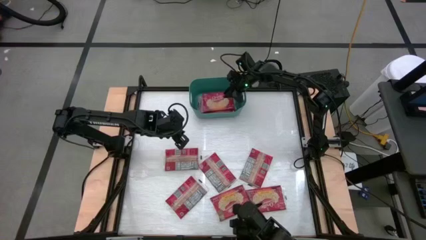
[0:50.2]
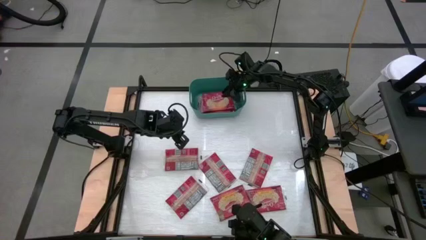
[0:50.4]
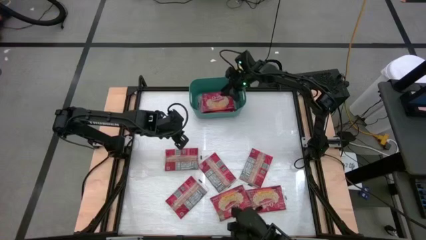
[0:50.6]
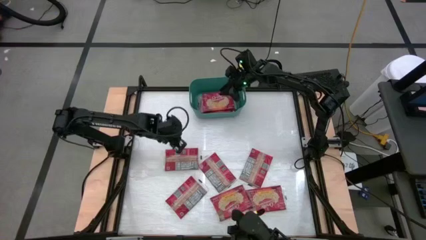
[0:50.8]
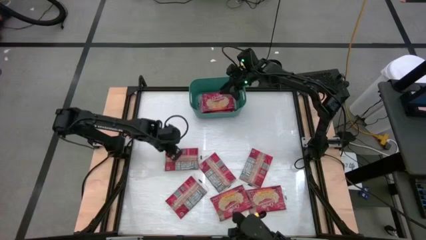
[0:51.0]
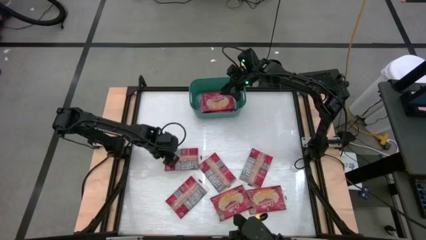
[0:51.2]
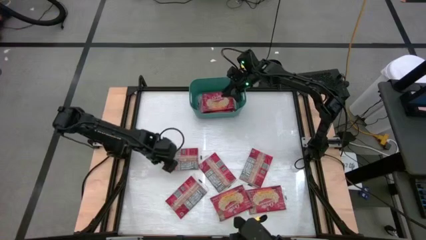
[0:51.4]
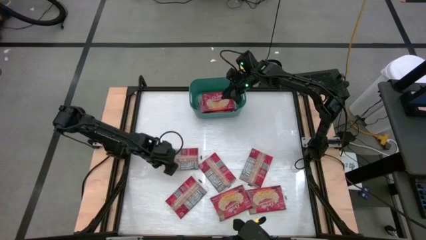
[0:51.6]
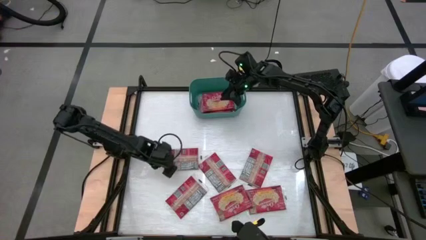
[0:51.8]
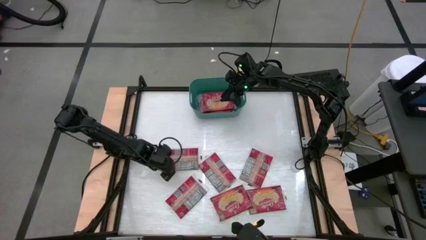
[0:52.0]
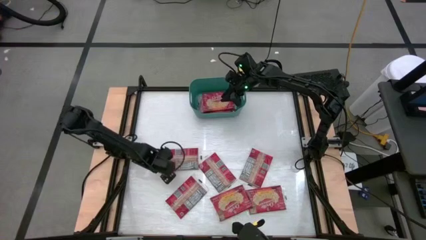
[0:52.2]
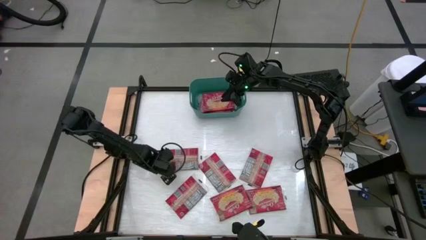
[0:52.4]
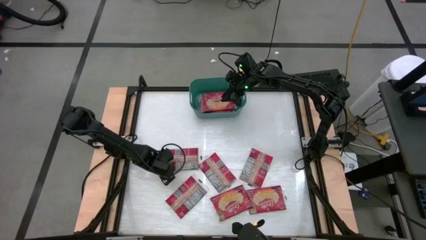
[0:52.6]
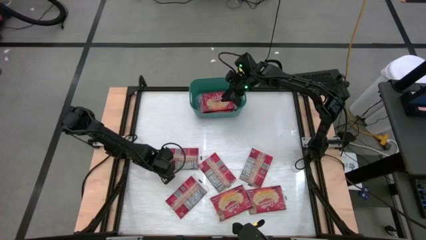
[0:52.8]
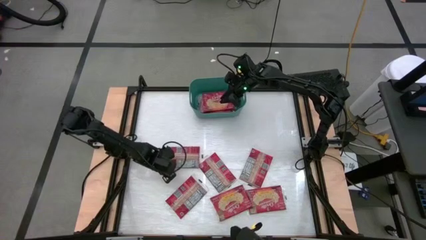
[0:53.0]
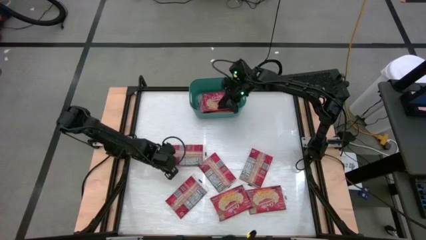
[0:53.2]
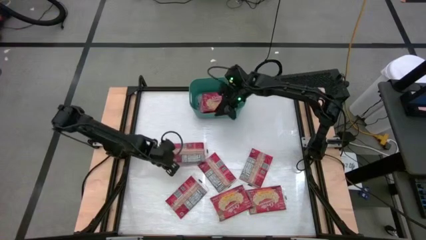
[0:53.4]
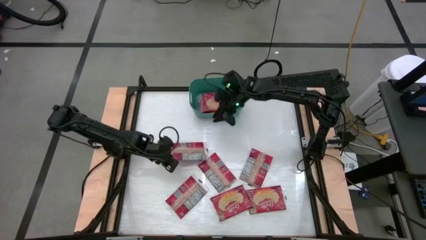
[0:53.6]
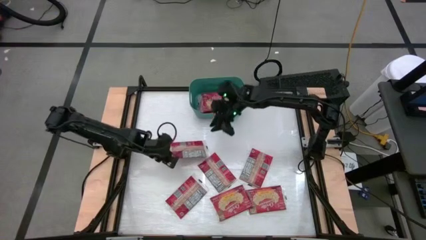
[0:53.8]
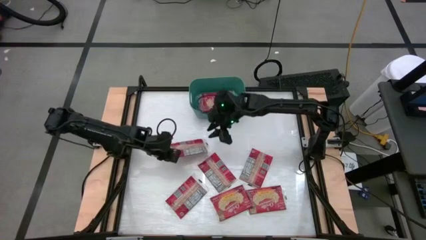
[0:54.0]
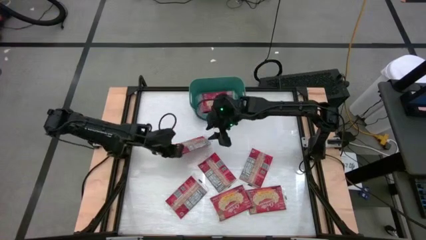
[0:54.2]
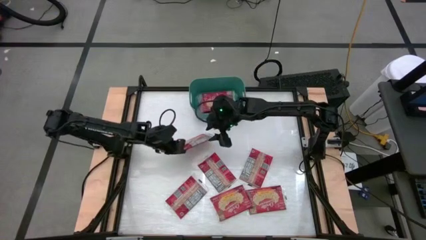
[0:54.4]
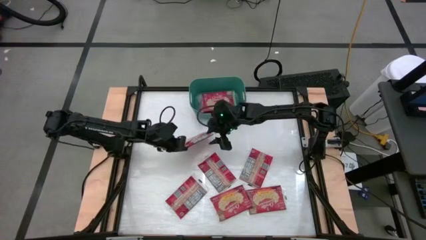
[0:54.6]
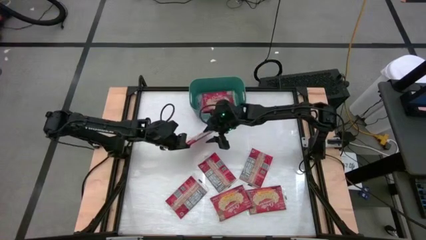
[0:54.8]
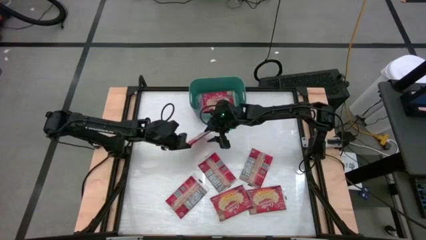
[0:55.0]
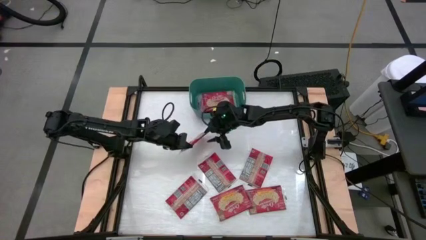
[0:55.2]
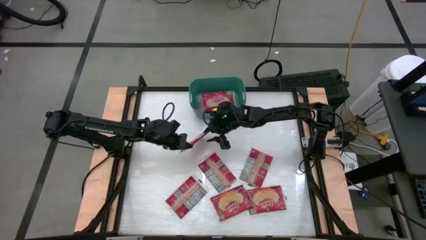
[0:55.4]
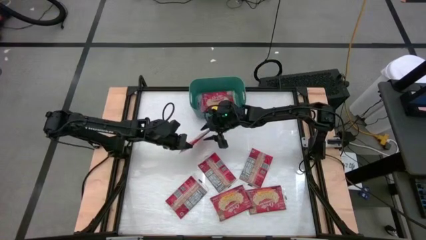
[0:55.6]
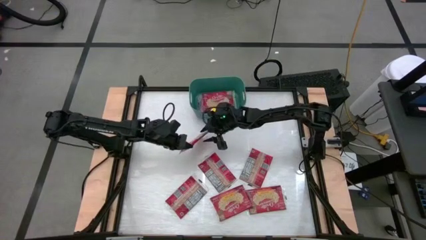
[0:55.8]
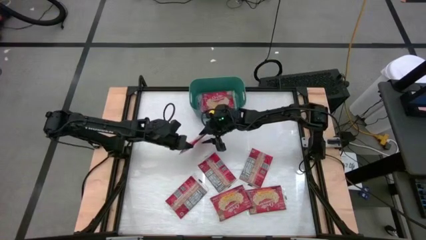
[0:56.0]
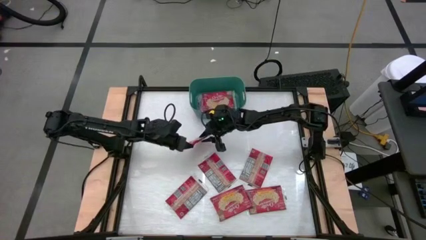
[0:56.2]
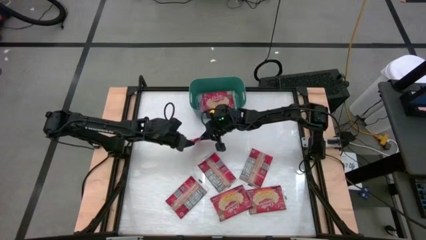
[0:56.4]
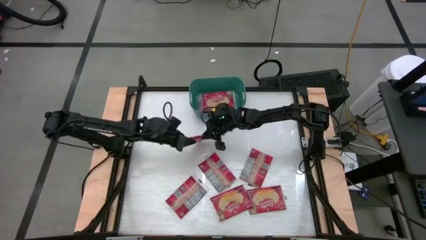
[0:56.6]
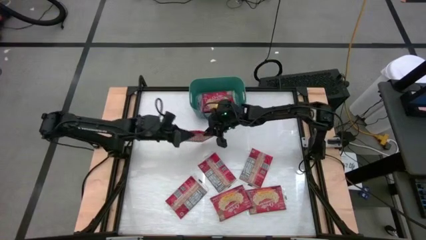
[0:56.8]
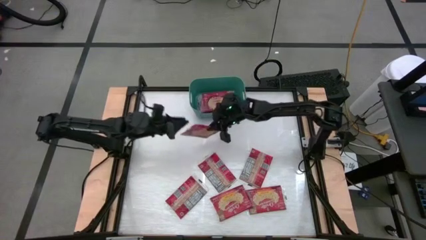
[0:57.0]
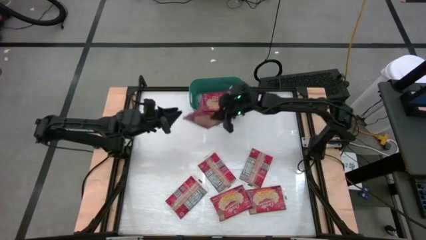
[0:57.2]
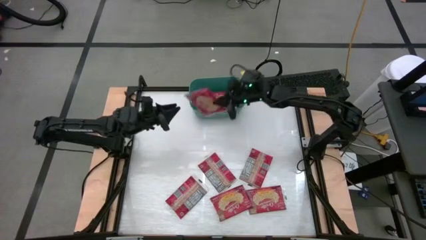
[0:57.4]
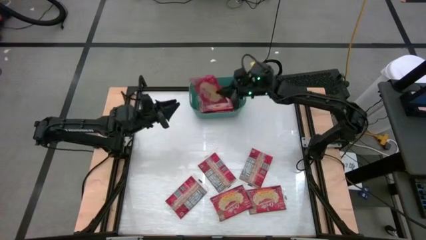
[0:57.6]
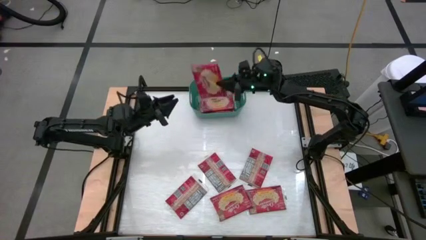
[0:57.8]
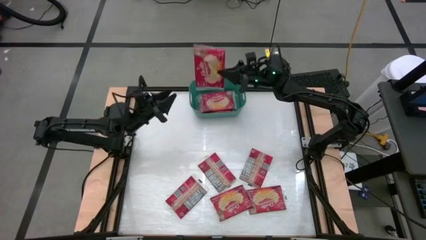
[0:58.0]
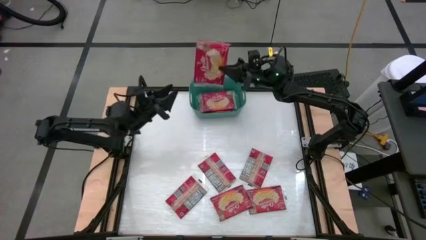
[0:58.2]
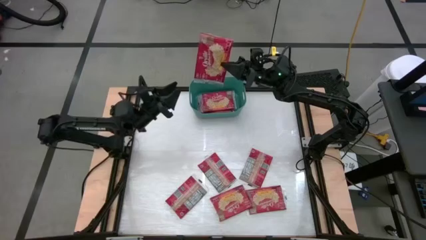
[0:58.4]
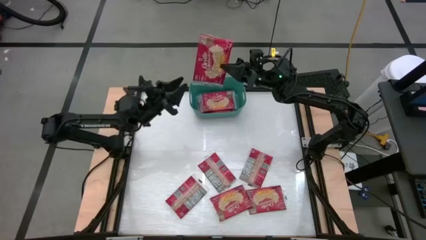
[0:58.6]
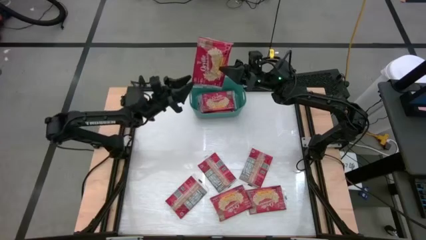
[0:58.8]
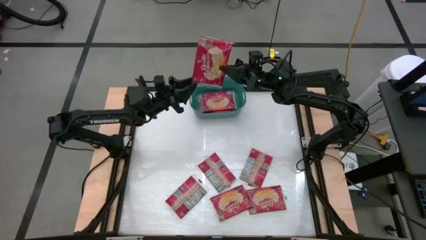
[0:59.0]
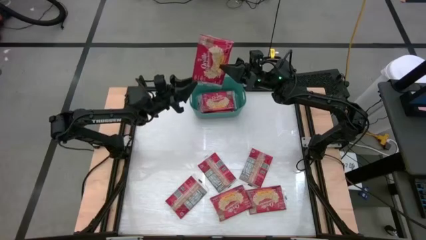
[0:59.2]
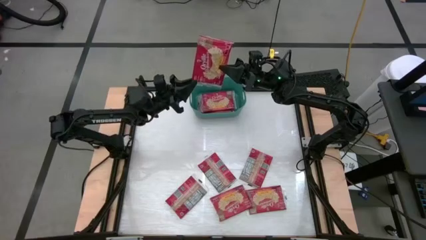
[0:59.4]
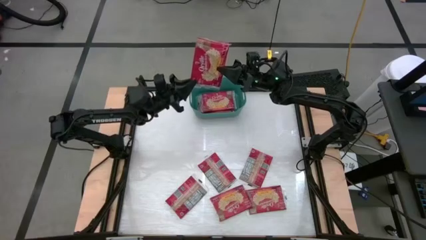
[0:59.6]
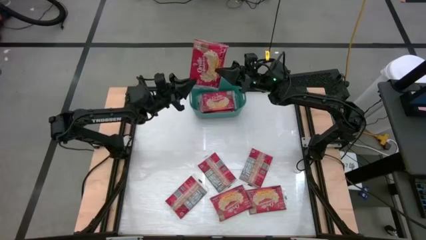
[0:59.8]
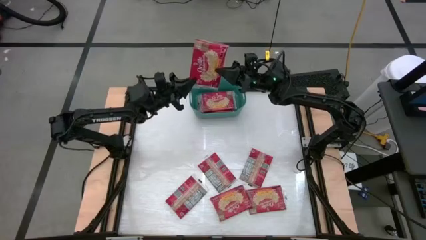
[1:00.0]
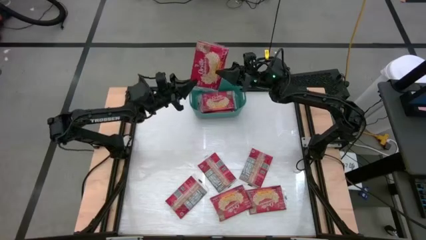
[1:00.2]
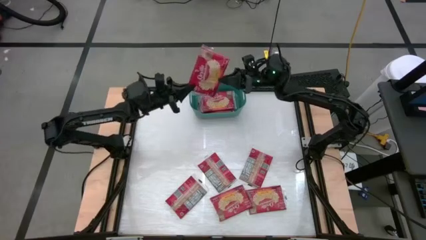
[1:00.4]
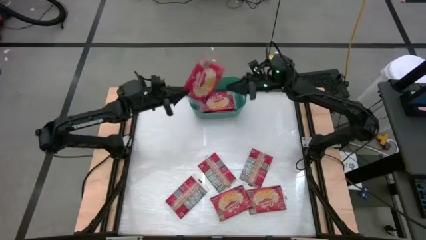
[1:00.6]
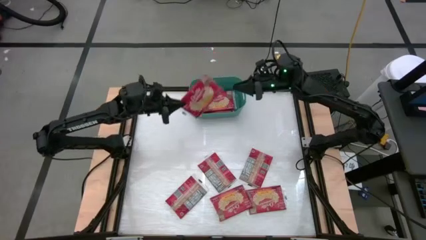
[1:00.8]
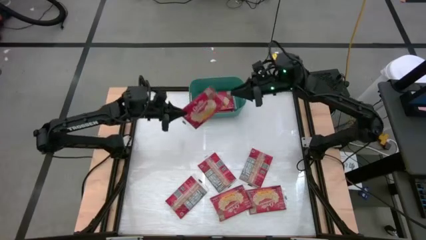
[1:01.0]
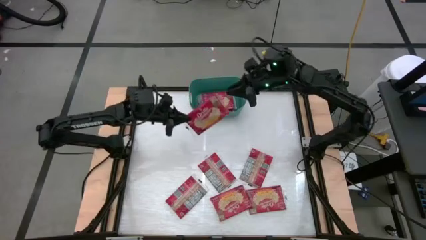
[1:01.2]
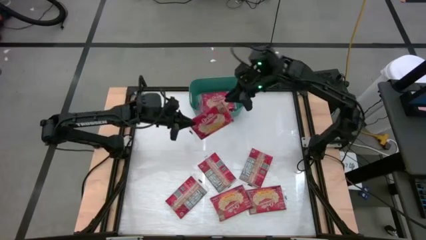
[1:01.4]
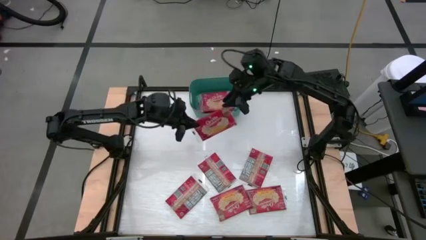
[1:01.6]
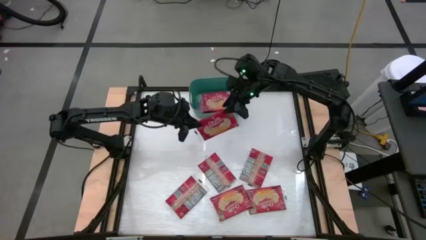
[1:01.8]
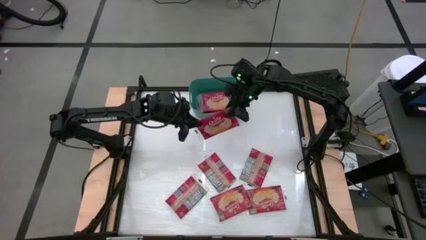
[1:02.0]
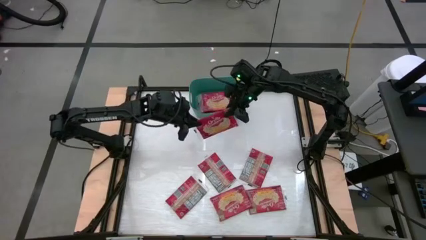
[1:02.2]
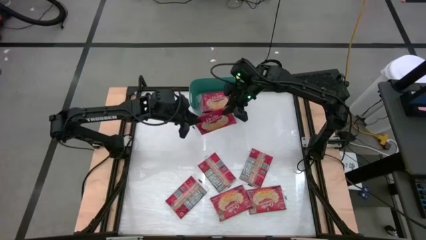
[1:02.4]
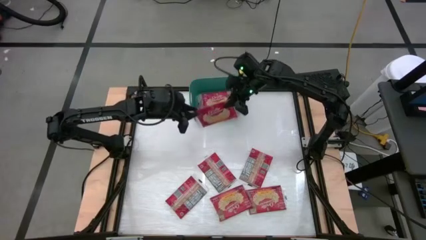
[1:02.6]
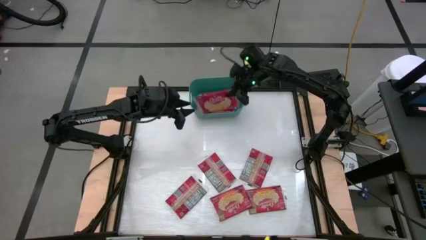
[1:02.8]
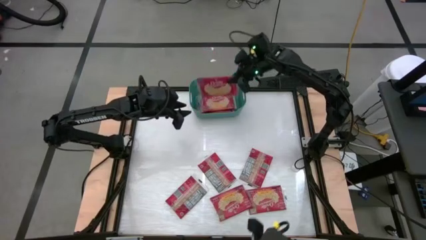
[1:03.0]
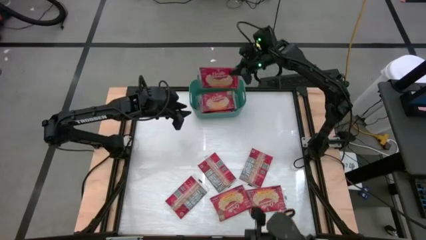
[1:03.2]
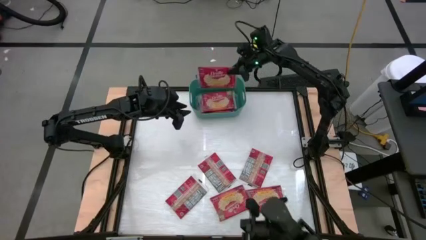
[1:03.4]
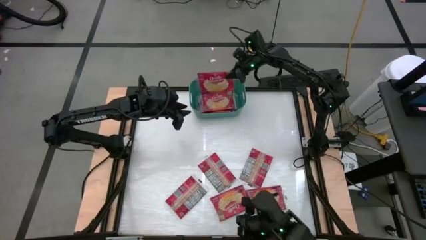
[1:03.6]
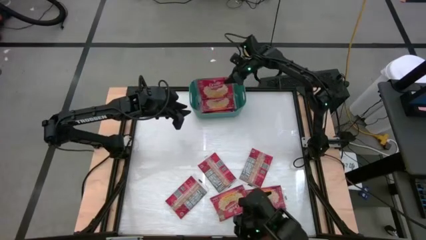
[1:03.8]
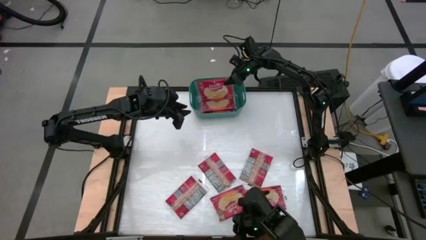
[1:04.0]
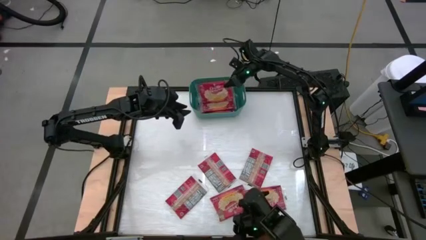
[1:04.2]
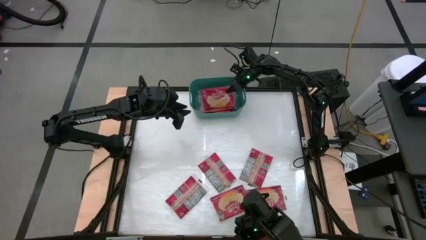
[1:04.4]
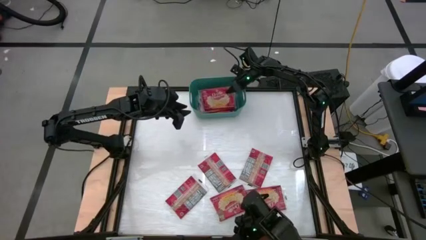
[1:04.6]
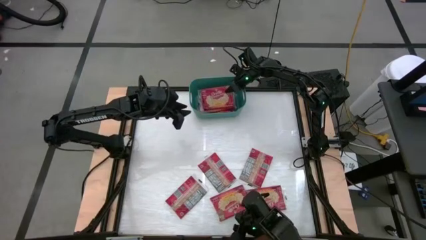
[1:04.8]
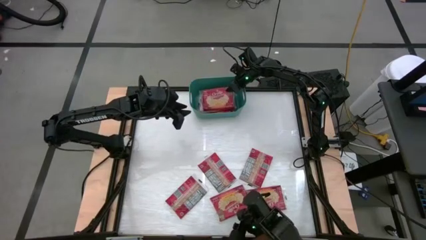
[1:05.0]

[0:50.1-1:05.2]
Task: Sort popcorn bags into baskets
Put the red popcorn pack into the green bin

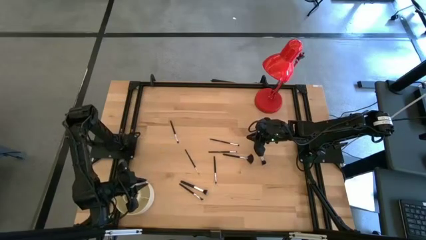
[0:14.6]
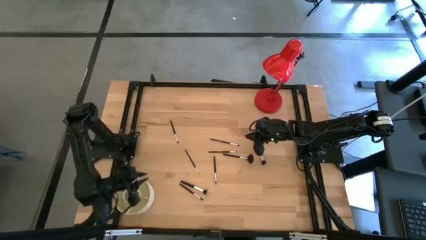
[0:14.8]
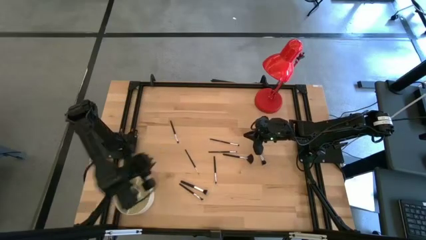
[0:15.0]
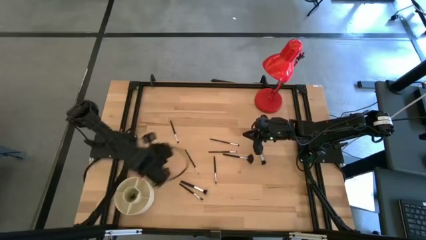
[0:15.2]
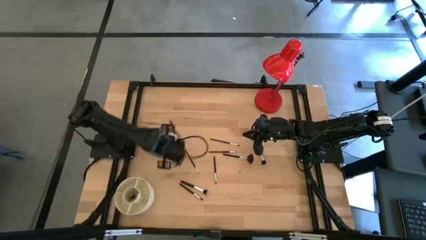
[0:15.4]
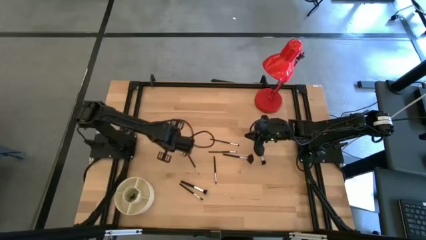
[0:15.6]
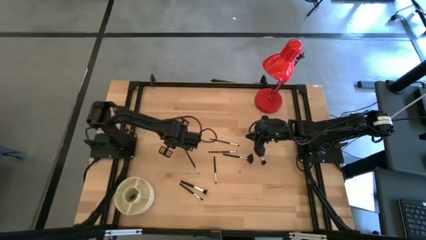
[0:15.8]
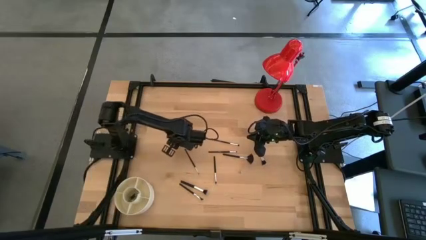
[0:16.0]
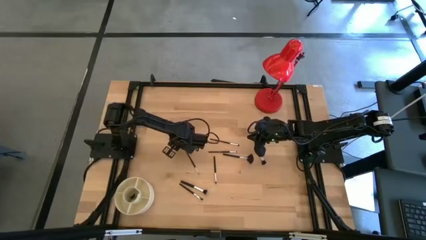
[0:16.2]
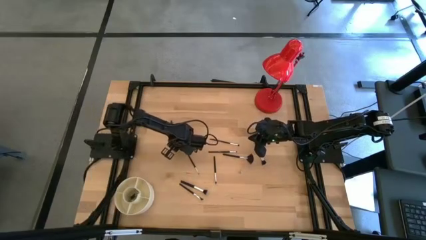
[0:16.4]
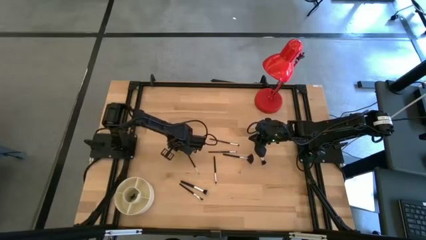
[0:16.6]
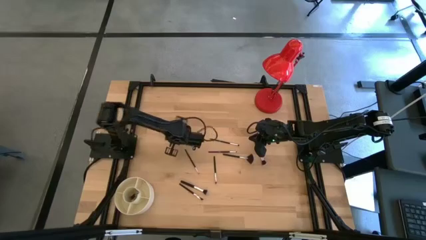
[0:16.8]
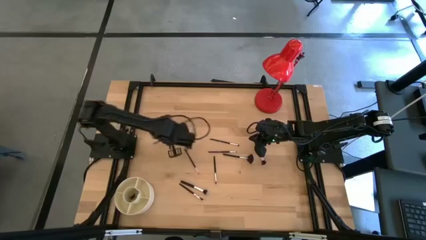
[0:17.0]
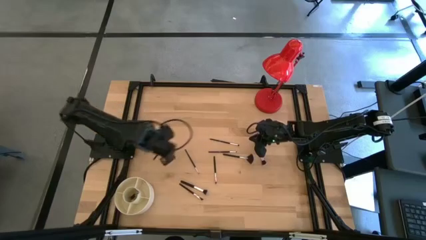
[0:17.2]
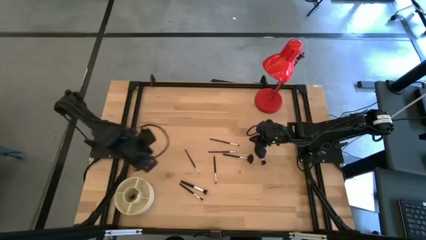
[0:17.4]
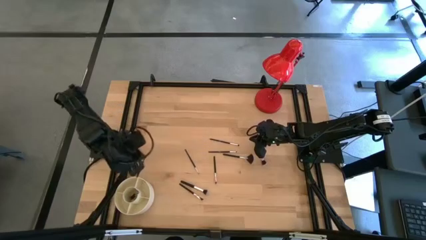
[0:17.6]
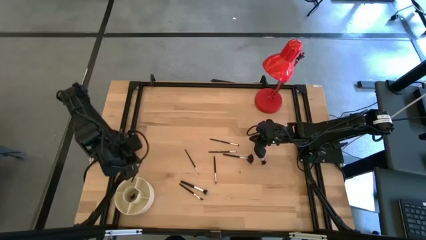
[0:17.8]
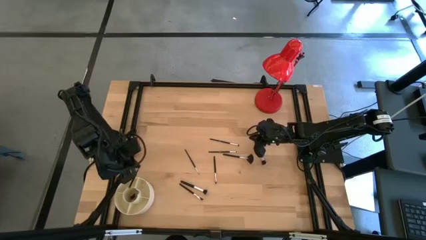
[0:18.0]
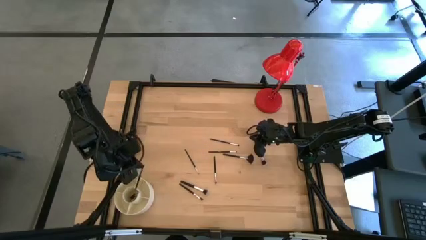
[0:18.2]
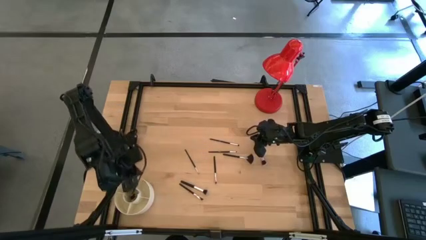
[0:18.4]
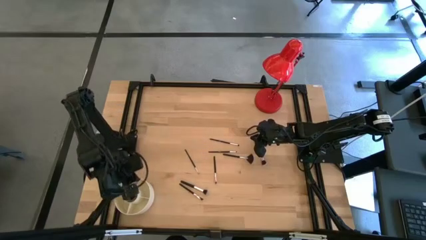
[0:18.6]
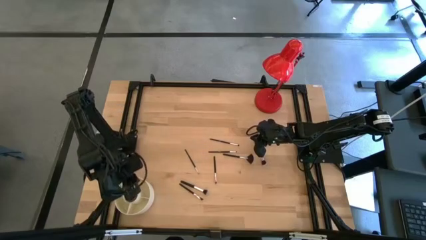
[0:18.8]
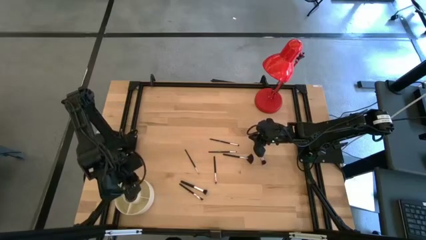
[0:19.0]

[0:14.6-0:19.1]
Task: Pick & Place Makeup Brushes
Put the black eyeshadow brush into the makeup organizer
